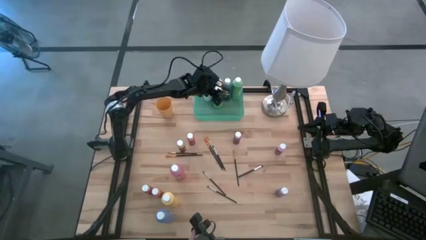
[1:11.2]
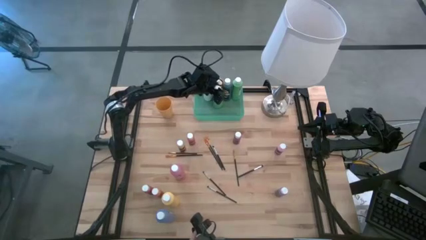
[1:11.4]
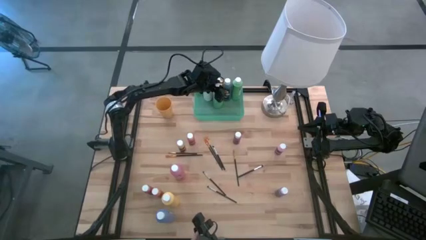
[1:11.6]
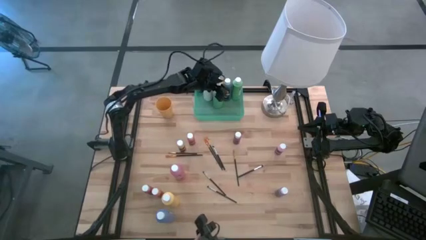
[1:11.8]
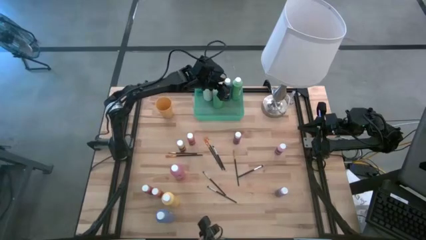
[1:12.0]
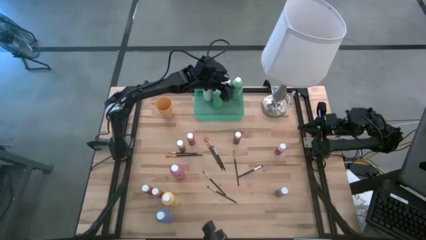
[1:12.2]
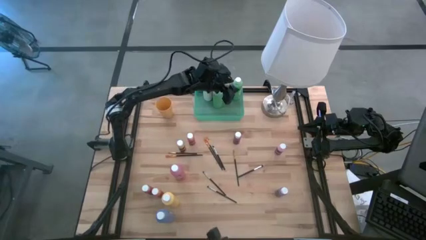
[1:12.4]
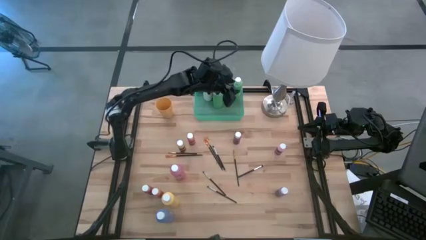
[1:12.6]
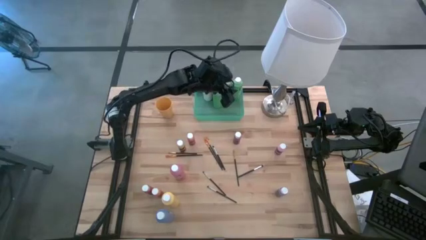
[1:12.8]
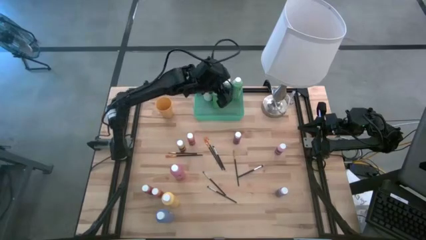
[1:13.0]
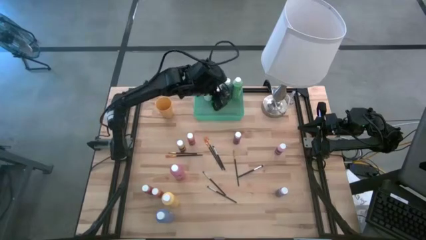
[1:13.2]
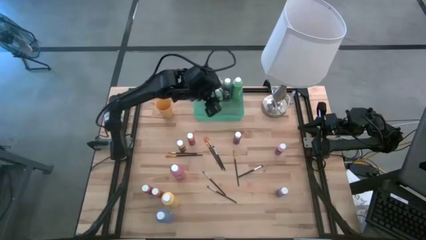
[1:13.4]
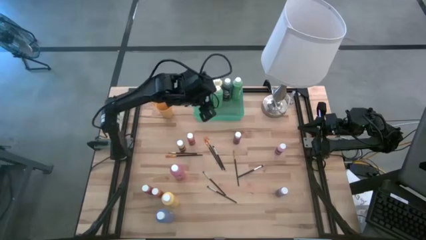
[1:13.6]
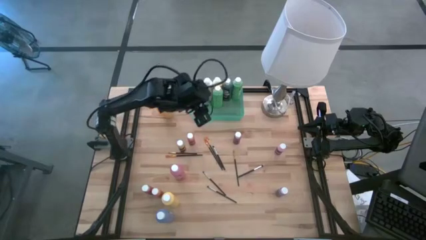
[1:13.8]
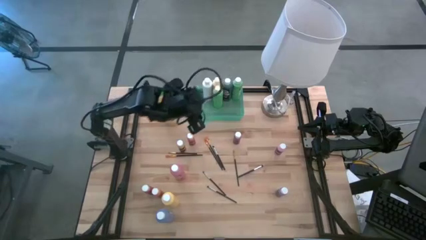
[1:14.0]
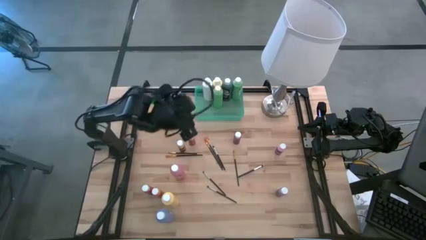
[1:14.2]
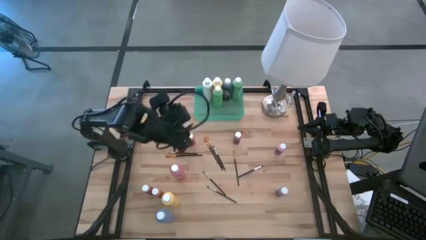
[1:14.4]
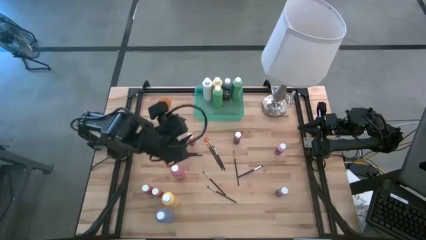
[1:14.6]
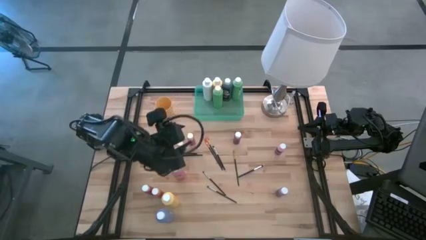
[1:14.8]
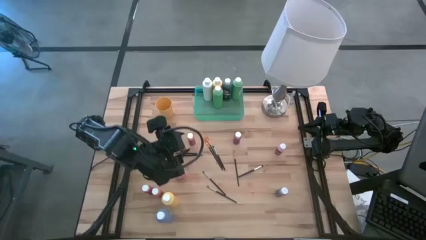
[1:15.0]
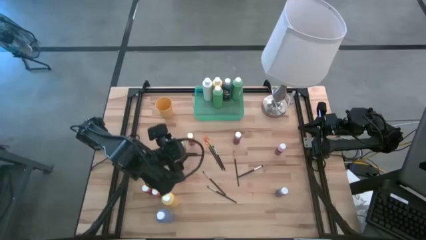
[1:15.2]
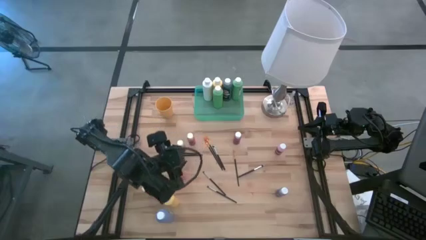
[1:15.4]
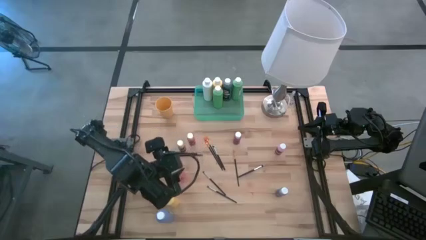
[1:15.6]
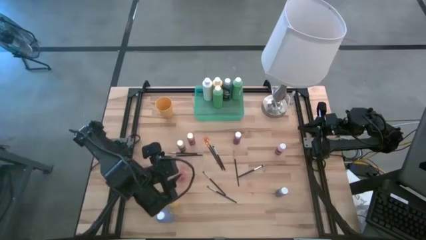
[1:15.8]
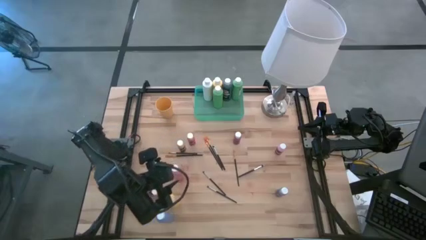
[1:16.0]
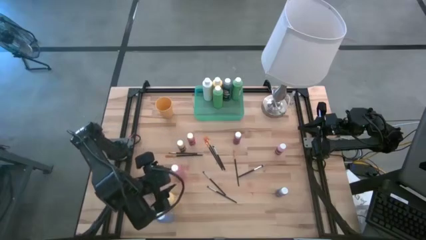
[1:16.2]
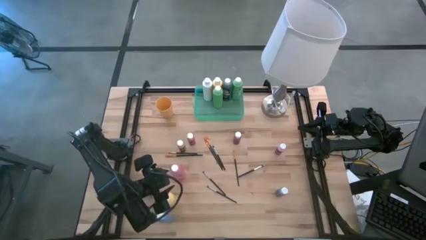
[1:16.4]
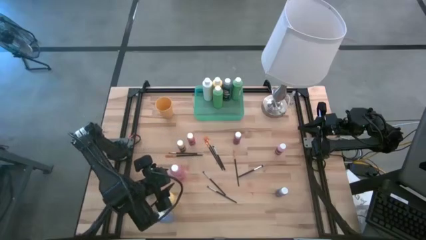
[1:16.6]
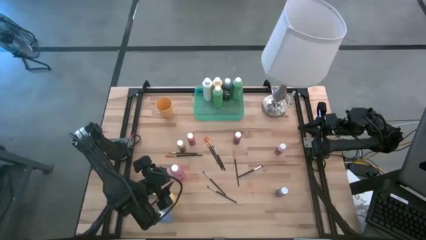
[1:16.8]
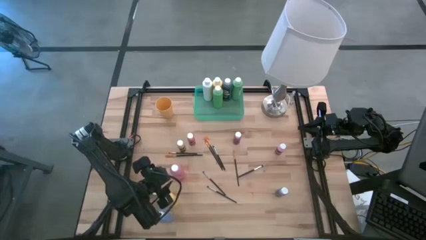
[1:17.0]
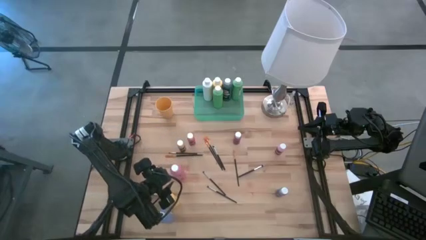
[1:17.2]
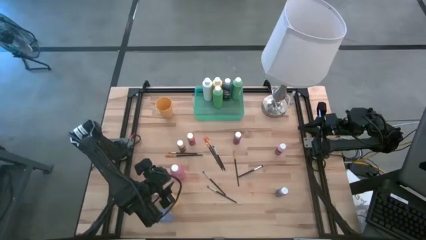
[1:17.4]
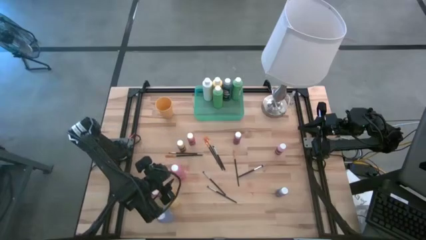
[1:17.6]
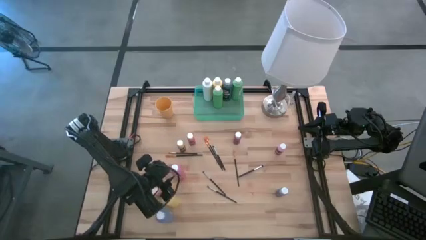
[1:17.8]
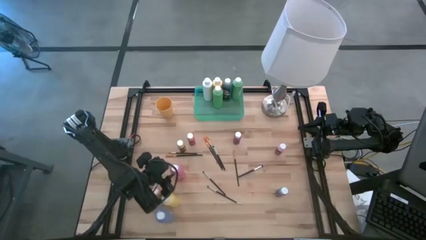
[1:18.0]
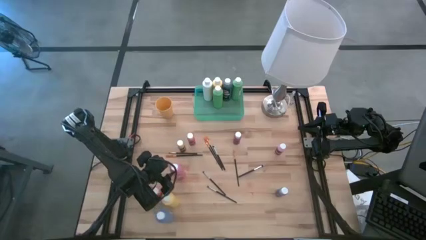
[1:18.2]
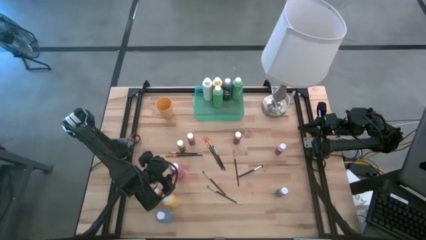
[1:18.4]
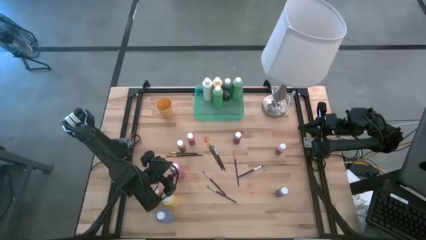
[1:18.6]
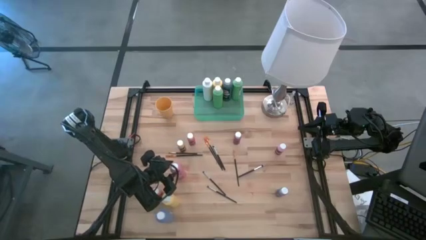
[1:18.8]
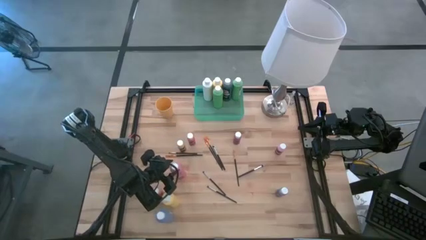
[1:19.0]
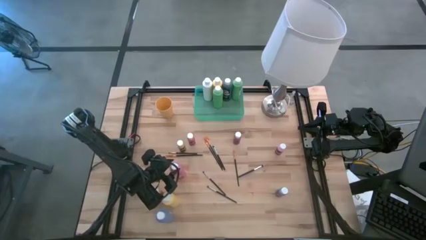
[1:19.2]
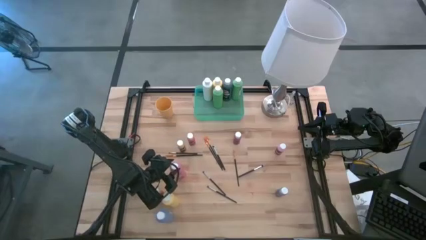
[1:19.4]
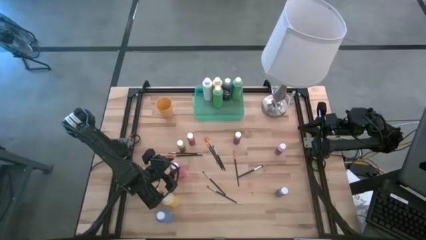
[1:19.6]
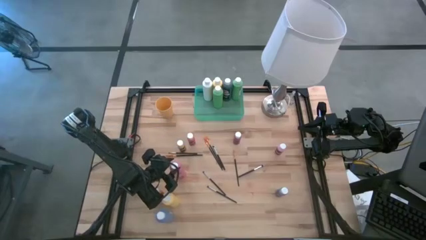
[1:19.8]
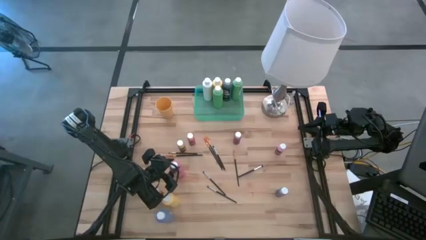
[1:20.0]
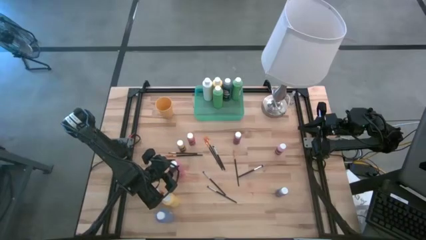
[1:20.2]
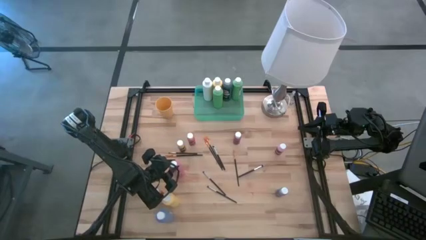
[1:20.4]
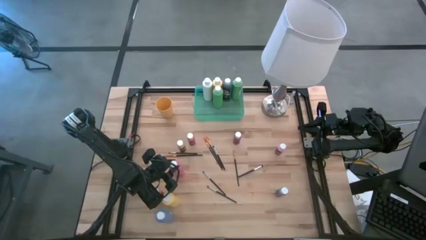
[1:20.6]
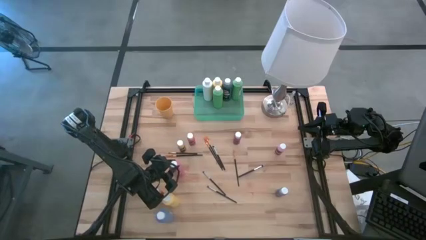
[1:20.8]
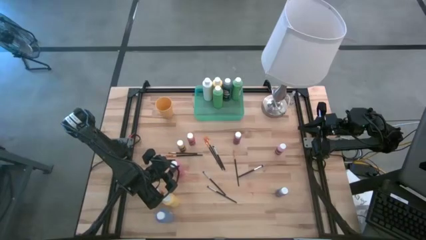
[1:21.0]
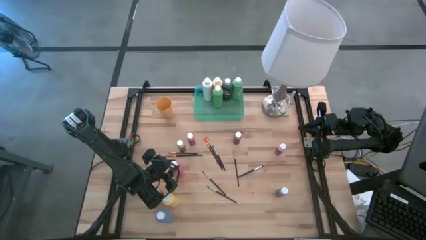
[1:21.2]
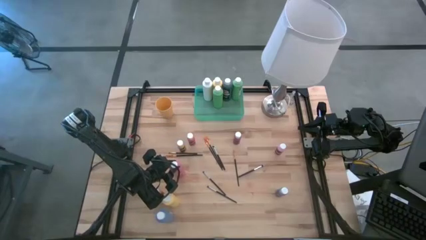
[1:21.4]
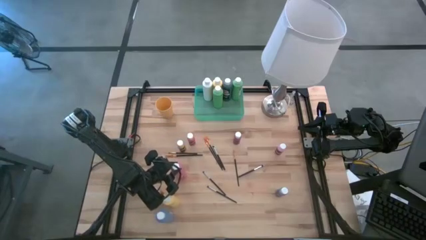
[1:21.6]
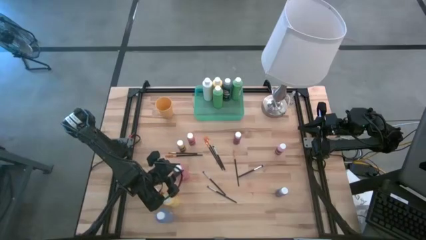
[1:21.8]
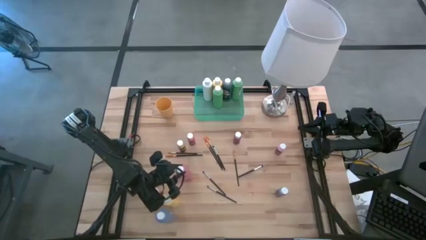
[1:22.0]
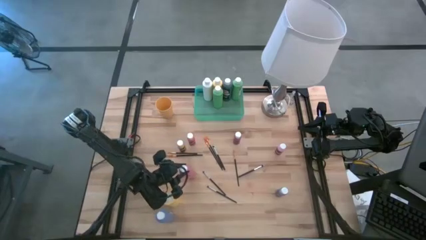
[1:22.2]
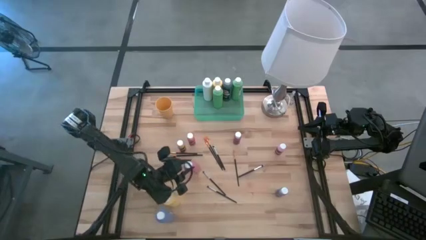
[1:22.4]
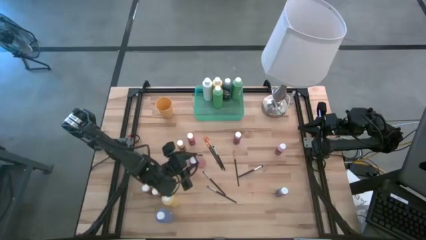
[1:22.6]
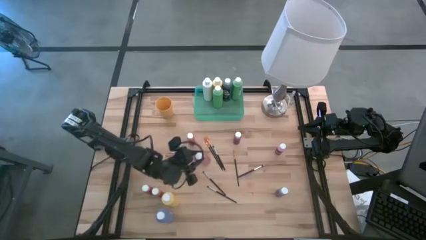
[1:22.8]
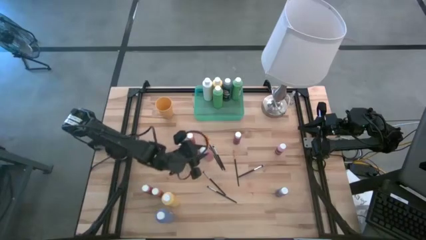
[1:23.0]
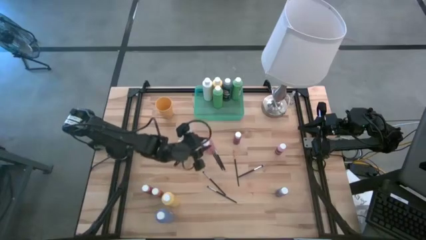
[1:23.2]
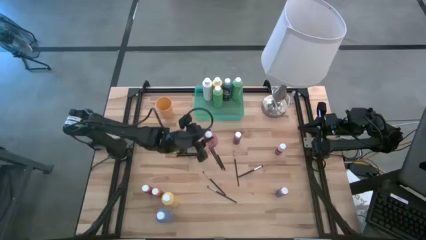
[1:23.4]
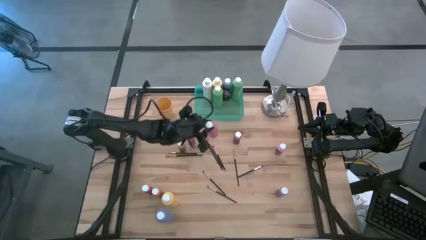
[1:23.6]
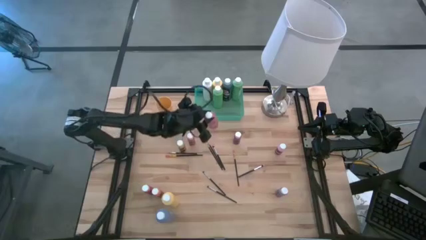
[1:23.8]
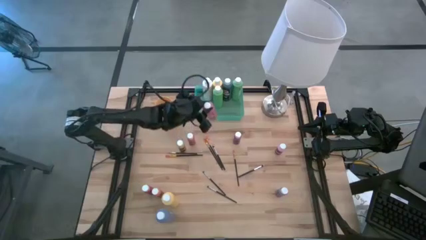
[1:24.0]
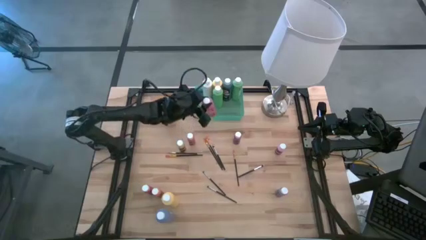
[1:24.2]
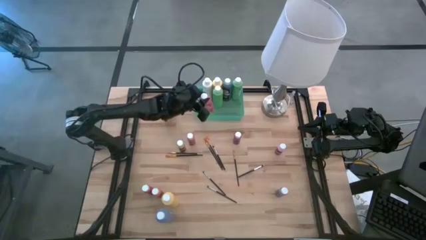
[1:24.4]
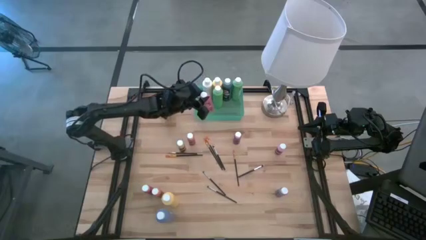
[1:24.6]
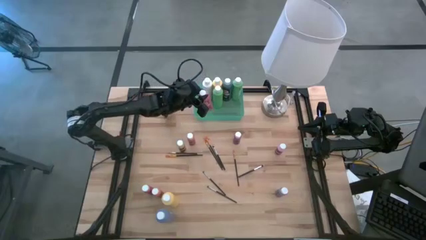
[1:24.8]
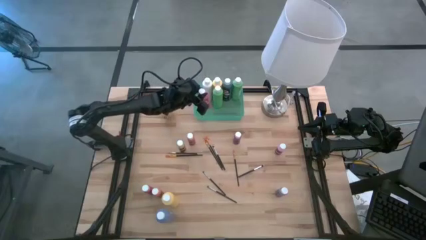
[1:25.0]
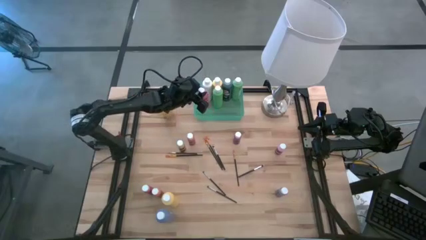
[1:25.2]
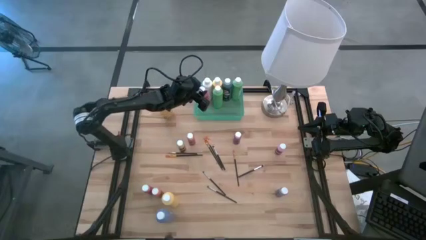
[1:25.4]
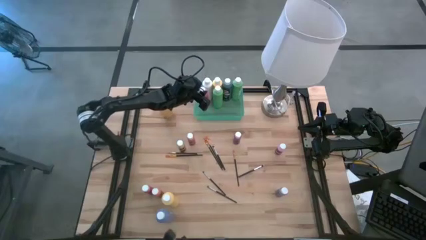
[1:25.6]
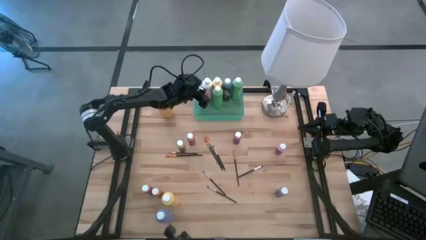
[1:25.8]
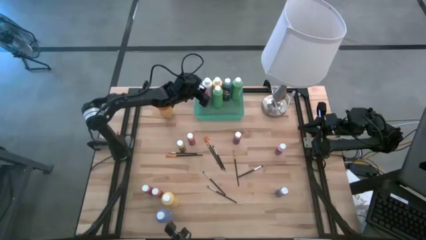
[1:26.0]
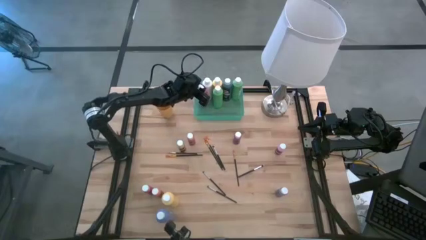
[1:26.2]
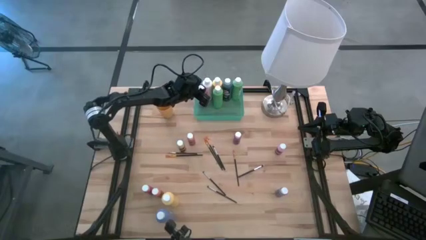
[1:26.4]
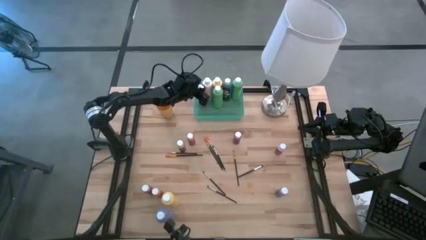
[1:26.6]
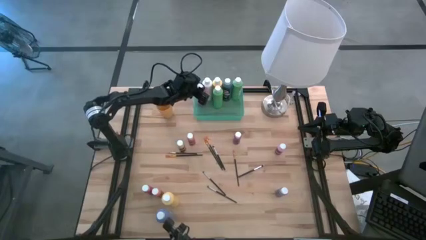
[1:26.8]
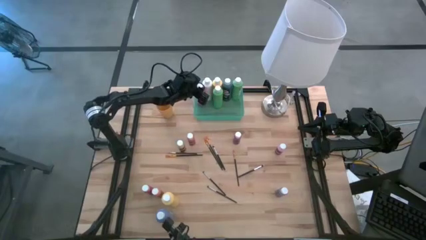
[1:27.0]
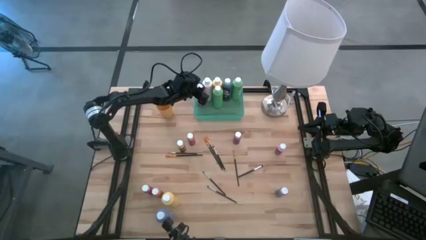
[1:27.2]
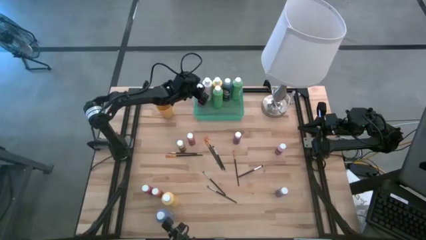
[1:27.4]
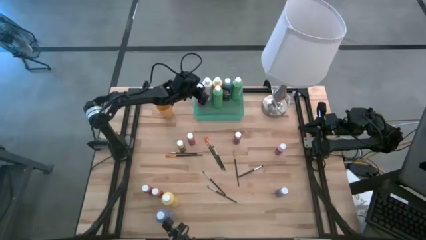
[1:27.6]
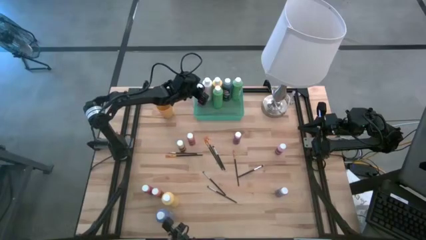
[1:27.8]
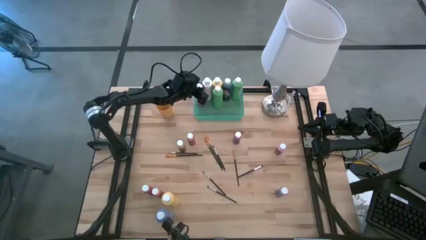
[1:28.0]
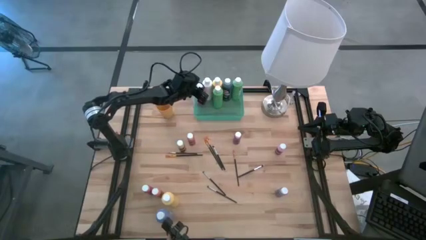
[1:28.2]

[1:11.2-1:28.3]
Task: Pick & Place Paint Supplies
Put the large red paint bottle into the green bin
